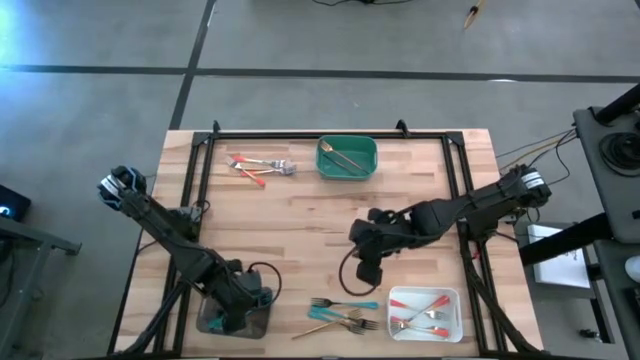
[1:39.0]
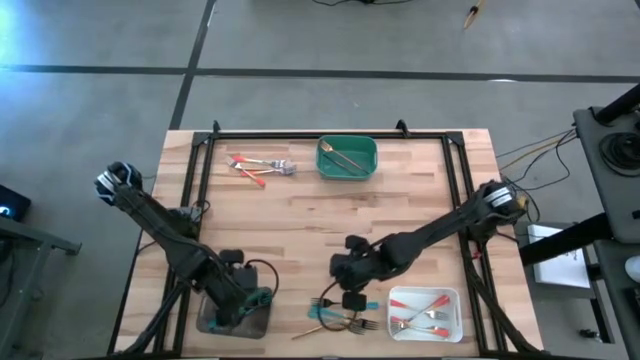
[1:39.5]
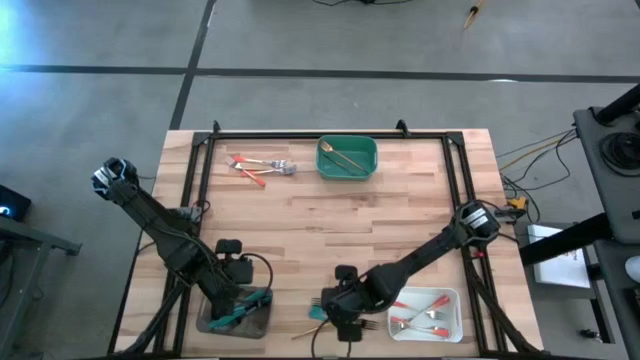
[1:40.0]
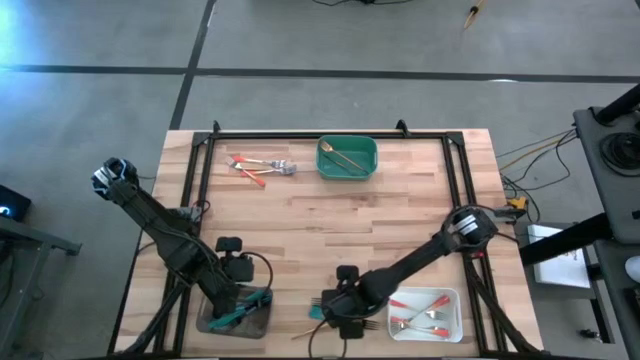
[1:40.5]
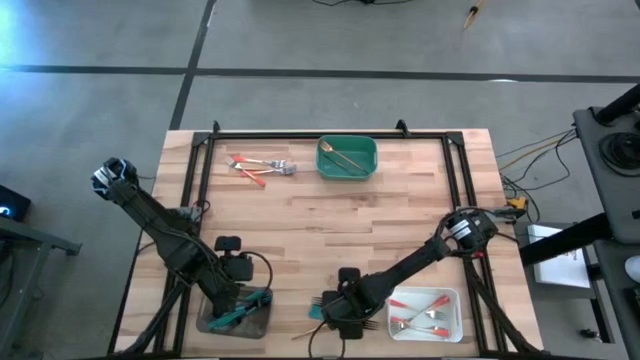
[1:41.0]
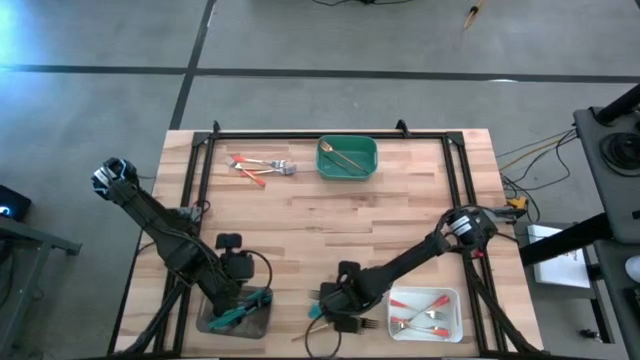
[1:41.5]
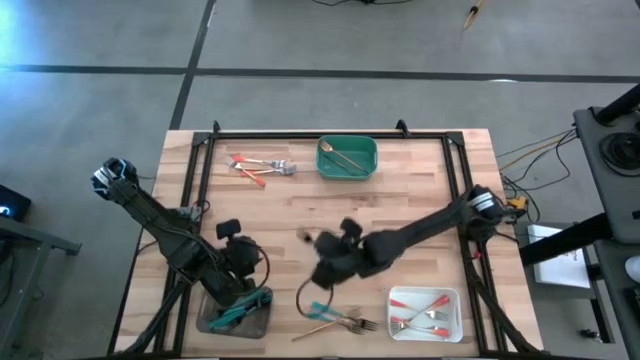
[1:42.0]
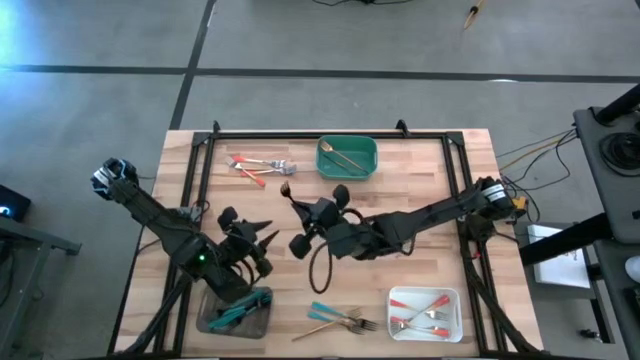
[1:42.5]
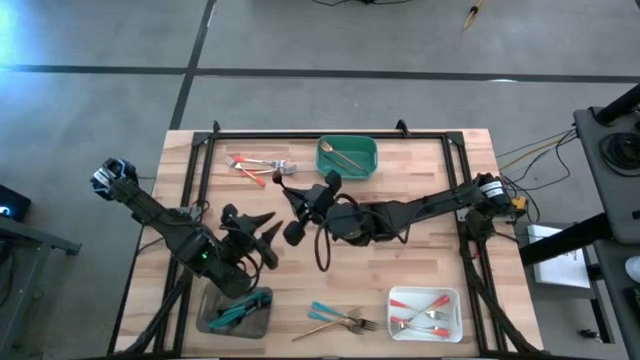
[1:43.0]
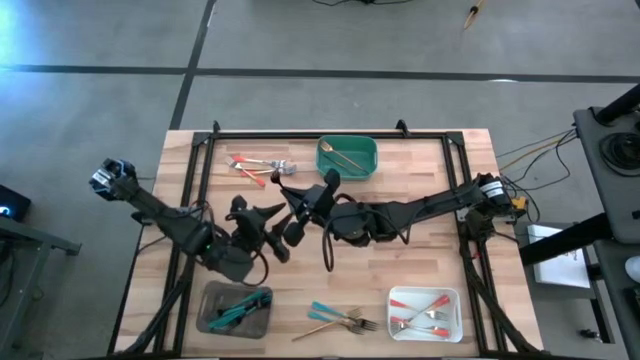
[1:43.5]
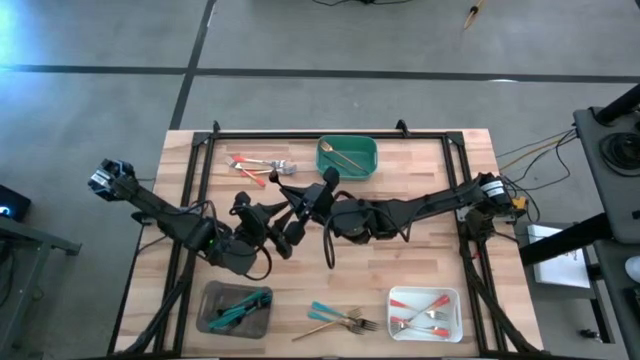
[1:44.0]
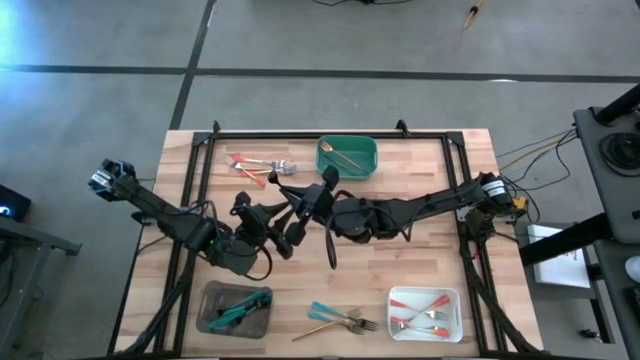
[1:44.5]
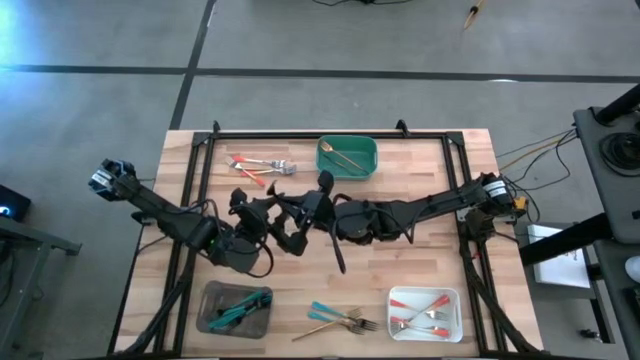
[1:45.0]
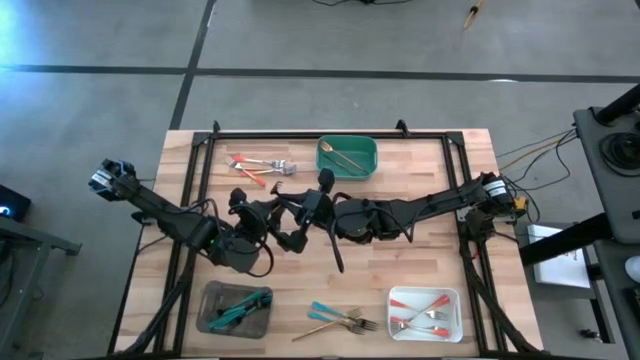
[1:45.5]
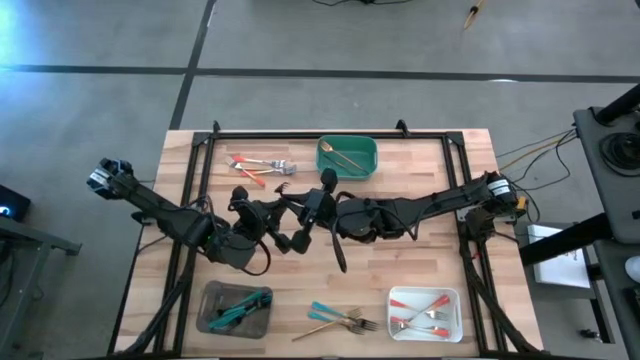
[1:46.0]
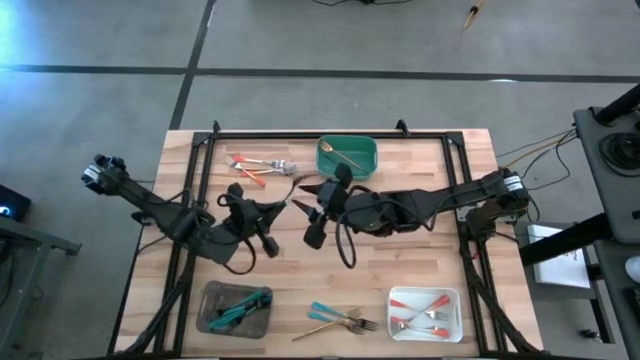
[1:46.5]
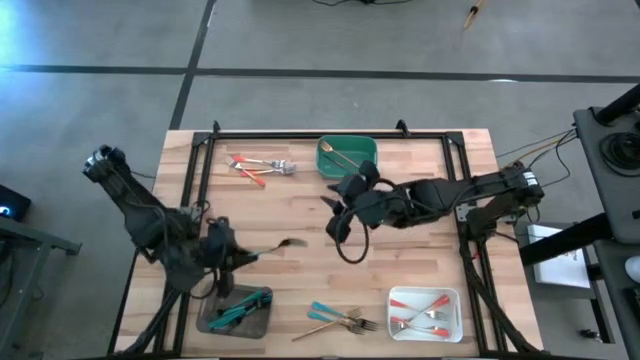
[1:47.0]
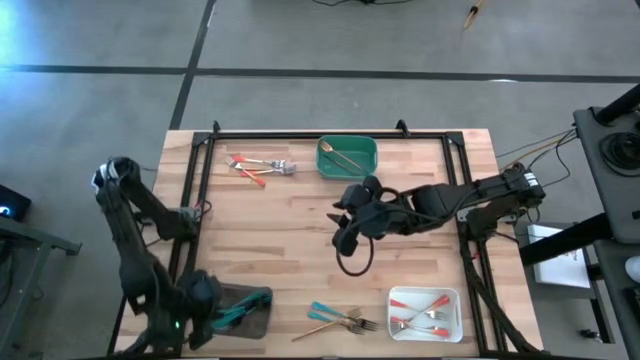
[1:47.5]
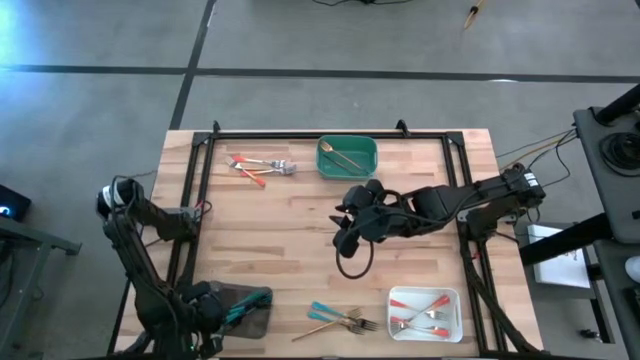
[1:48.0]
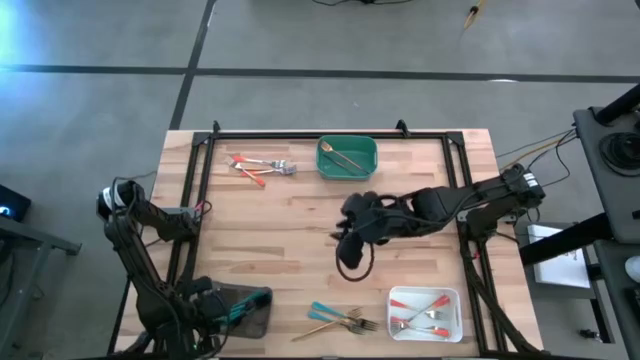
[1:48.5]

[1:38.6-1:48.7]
Task: Sort silverware by color (type)
Put the blue fork into the black bin

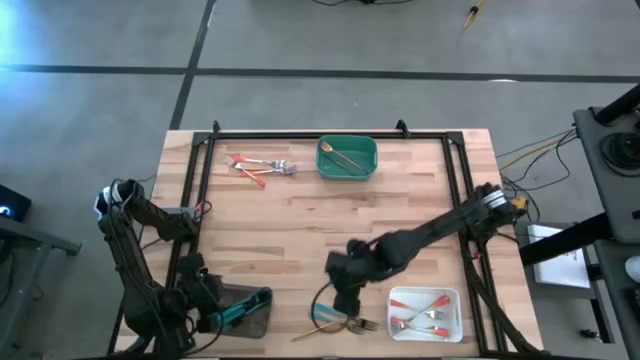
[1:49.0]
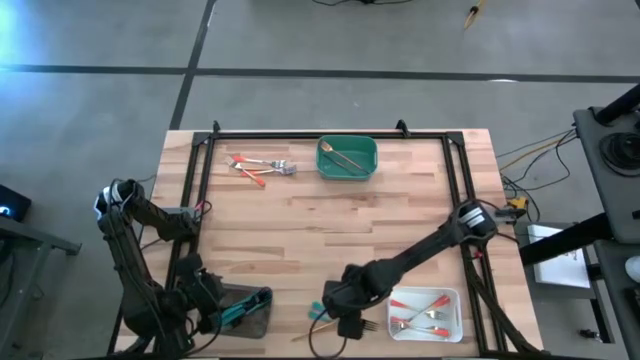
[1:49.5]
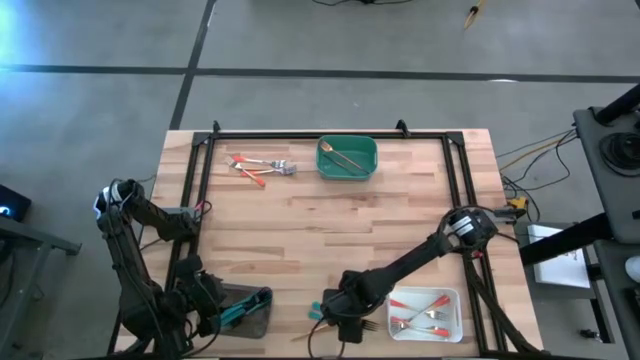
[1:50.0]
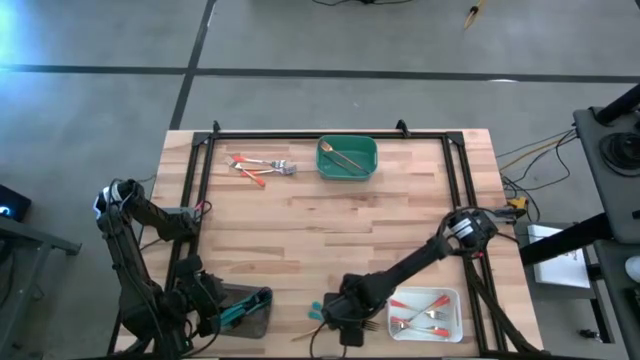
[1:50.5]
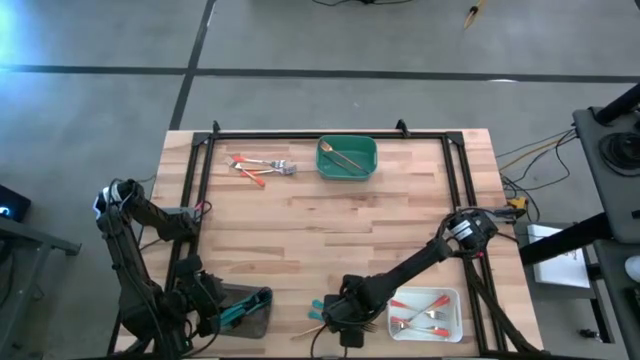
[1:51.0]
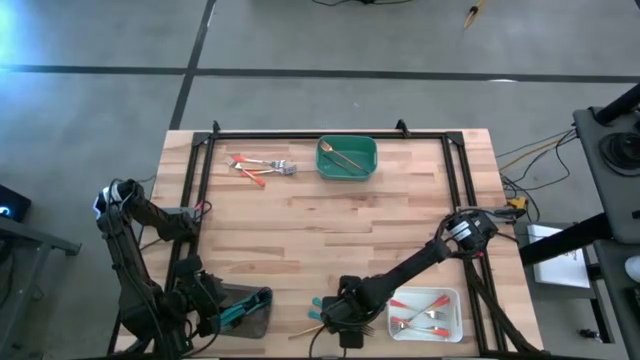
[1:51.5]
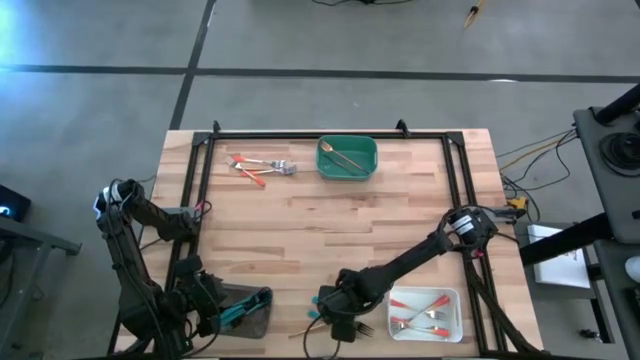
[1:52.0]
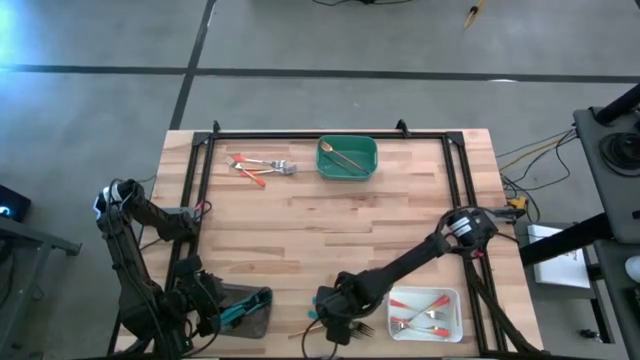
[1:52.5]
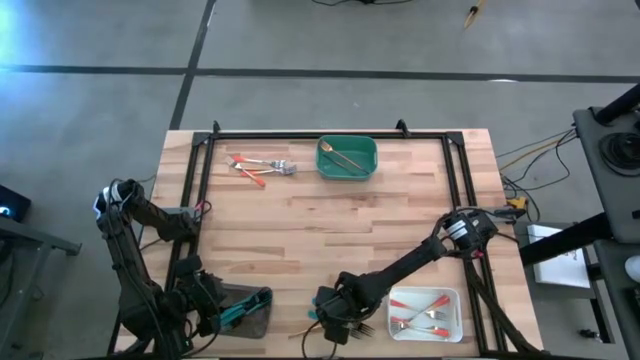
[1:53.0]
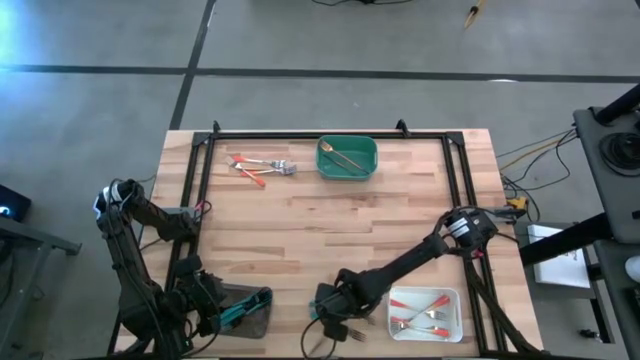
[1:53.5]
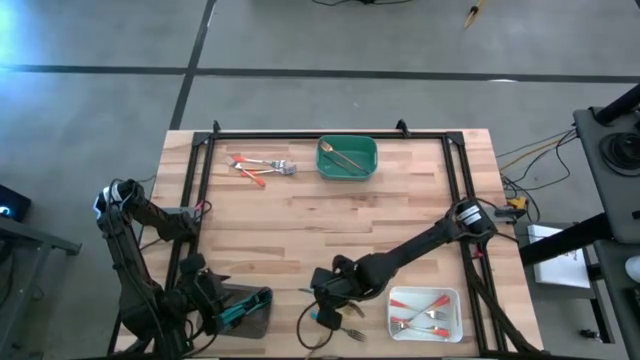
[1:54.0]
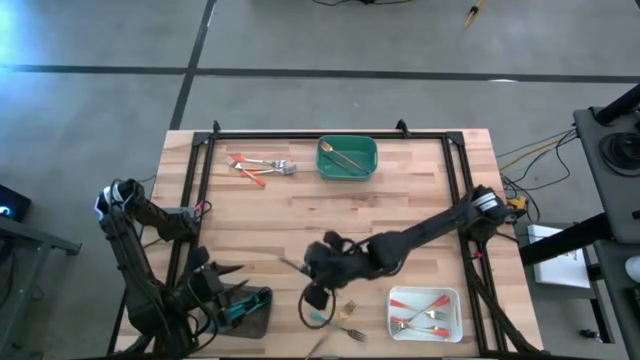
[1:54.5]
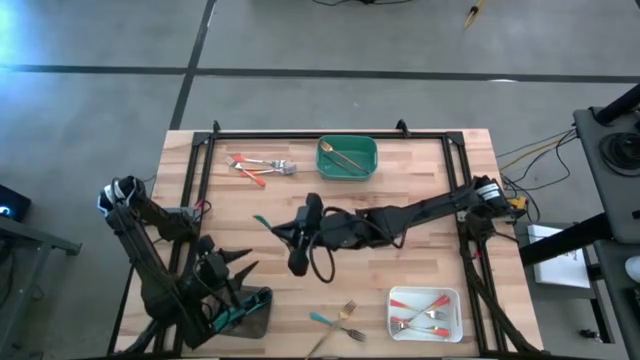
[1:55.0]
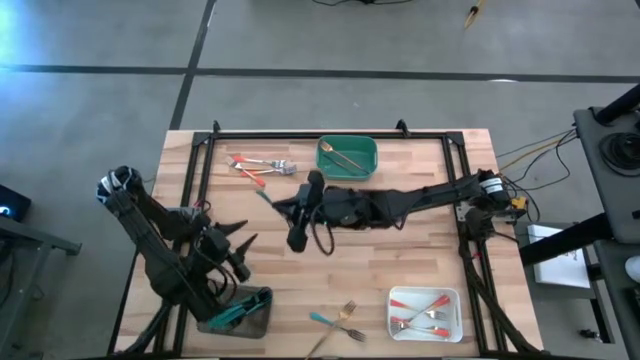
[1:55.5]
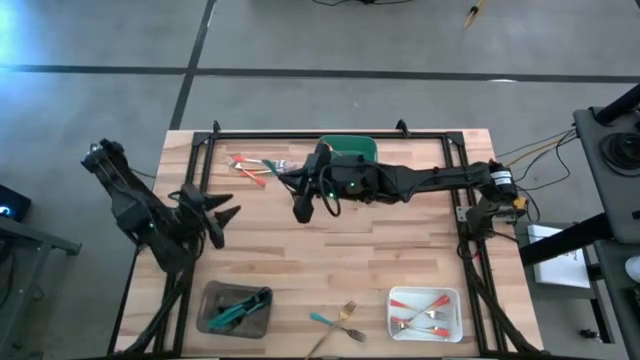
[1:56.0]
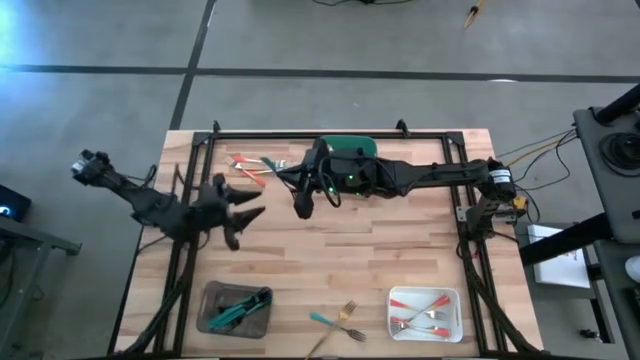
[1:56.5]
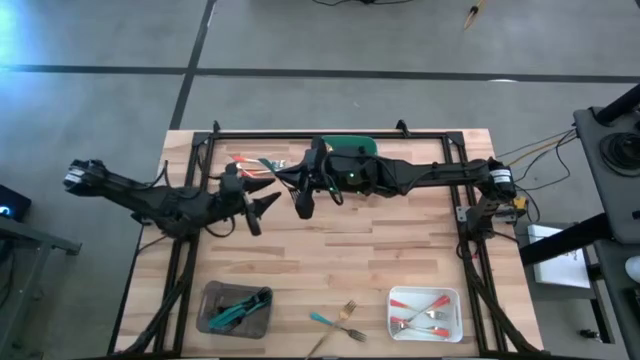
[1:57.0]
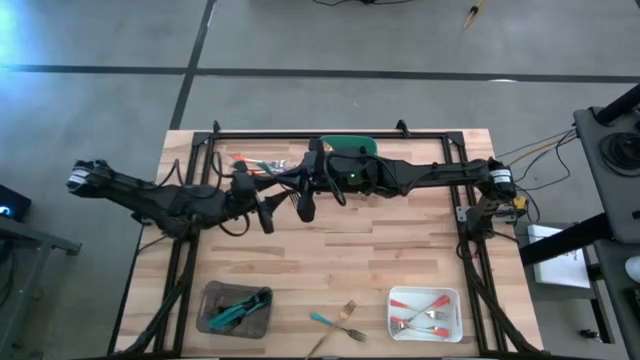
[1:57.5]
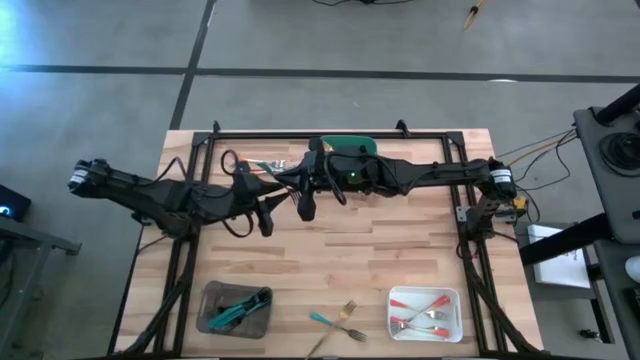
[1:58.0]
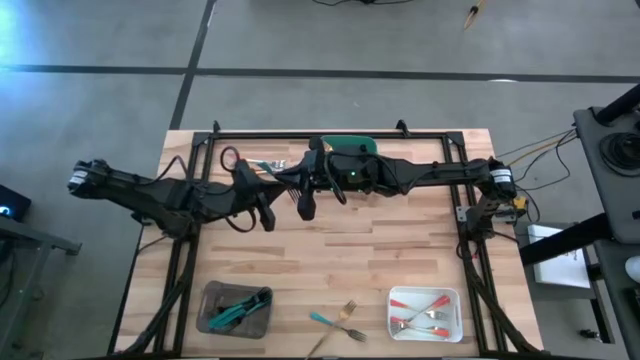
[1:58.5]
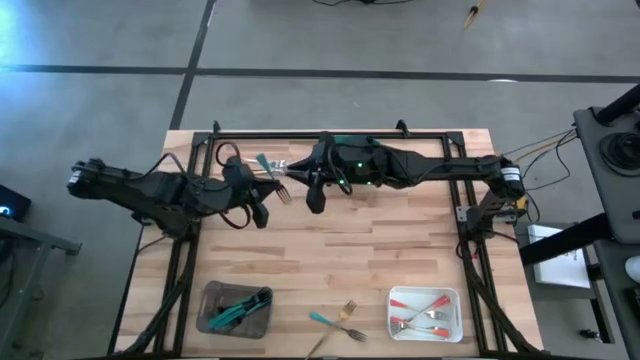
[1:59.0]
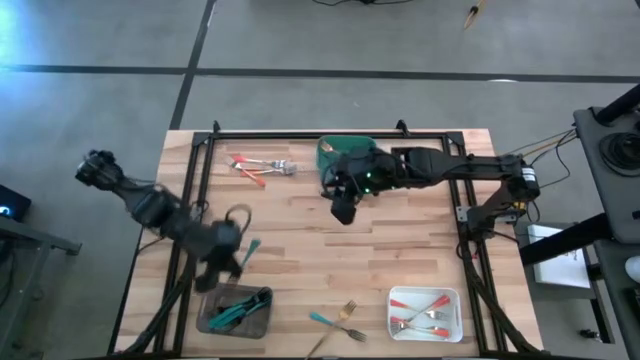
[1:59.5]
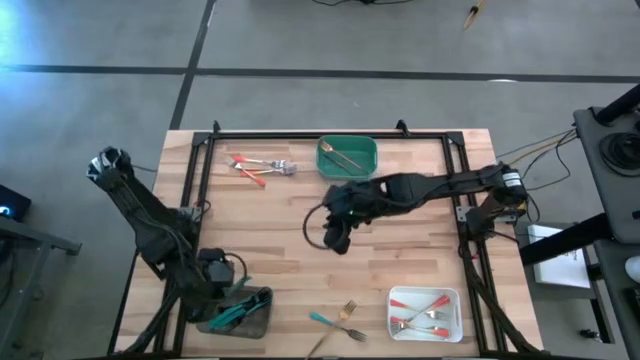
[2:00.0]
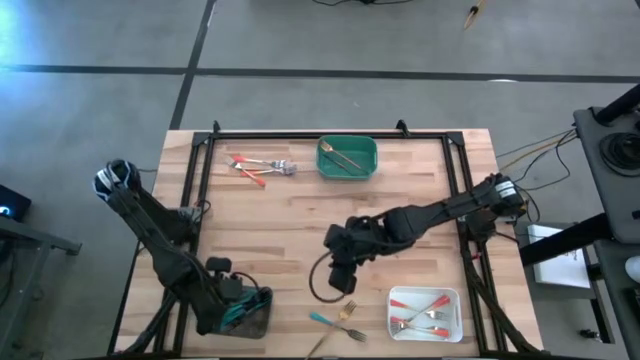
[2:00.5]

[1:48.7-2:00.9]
Put the blue fork into the black bin
